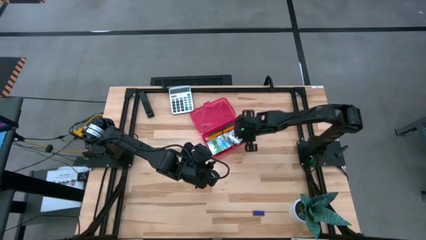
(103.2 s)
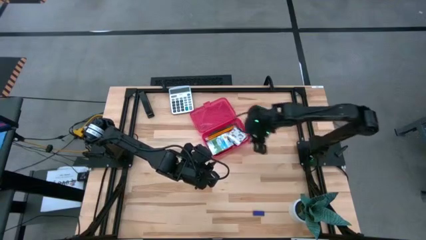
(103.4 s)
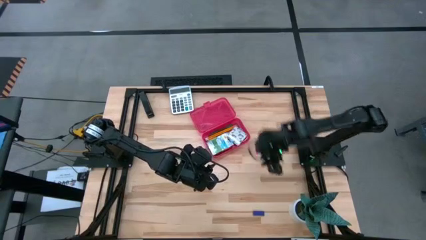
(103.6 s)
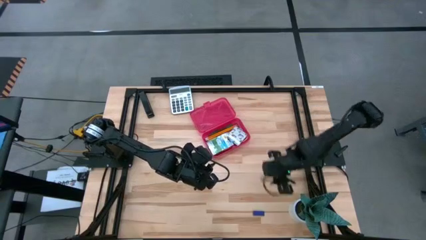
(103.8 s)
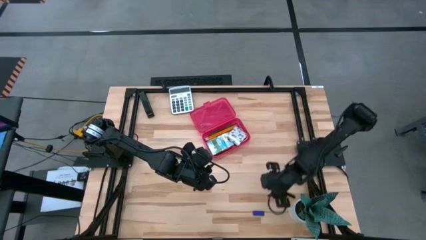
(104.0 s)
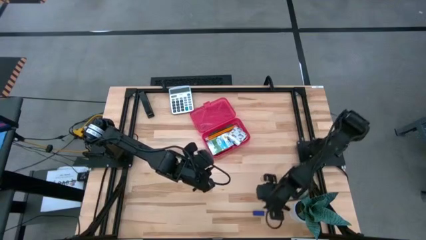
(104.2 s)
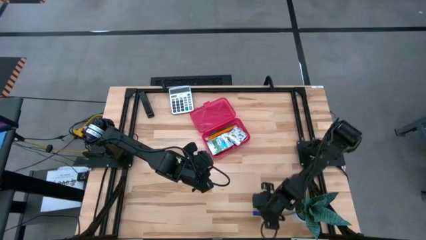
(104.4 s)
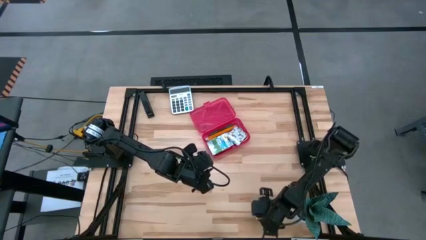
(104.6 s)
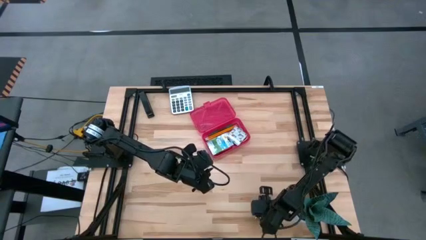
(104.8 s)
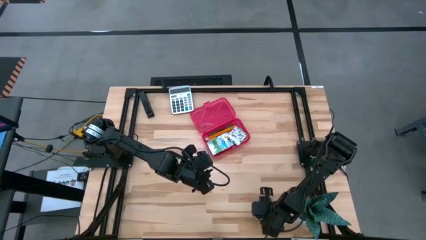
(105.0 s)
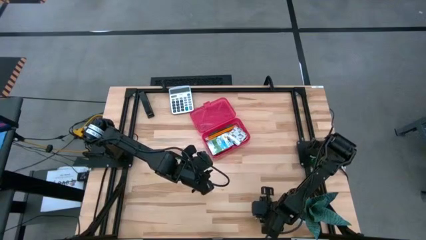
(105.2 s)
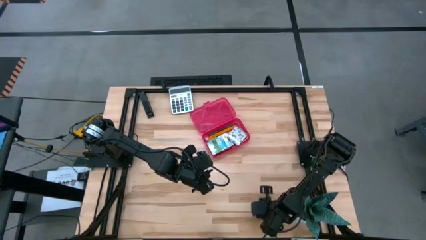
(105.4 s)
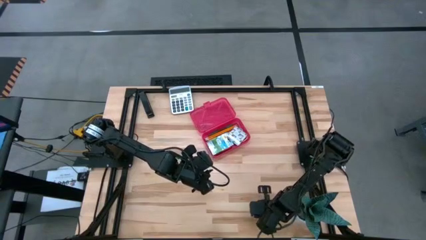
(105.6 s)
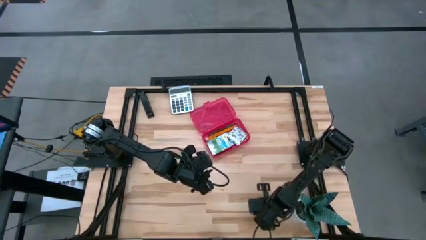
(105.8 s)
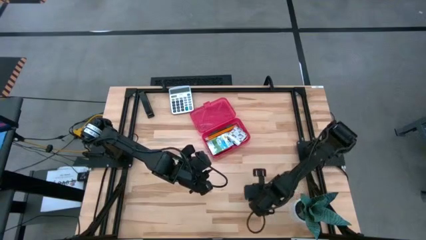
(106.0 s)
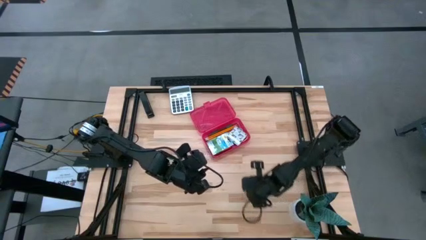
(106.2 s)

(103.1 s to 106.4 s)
Task: Pack school essentials
Put the blue eraser into the red supply box

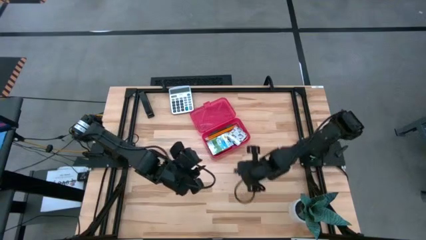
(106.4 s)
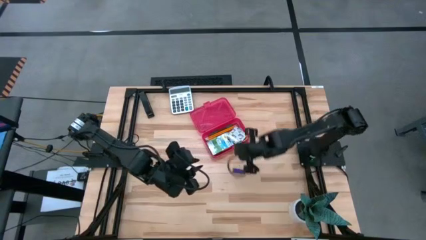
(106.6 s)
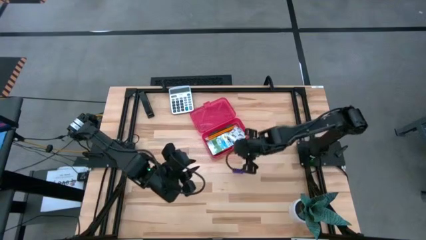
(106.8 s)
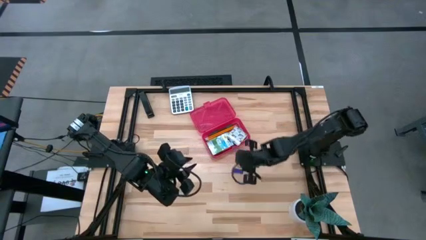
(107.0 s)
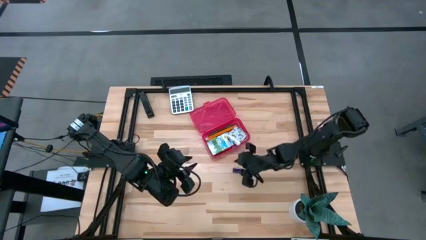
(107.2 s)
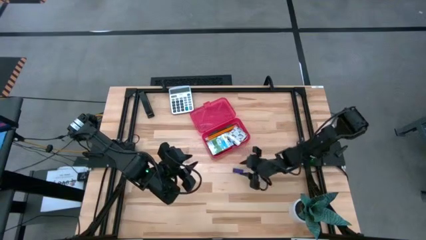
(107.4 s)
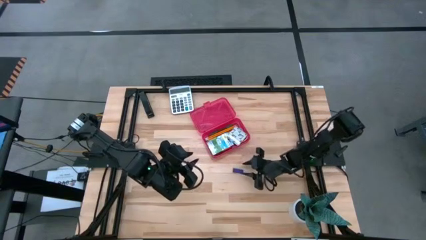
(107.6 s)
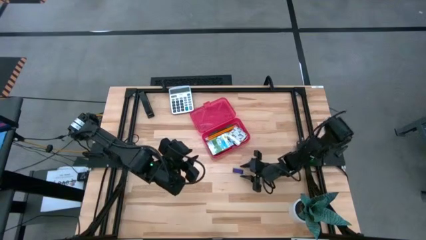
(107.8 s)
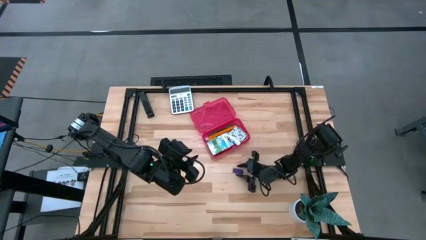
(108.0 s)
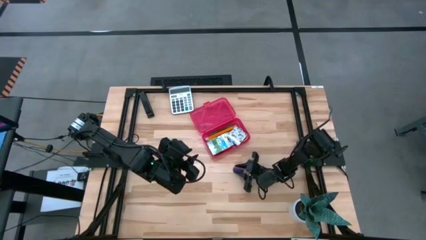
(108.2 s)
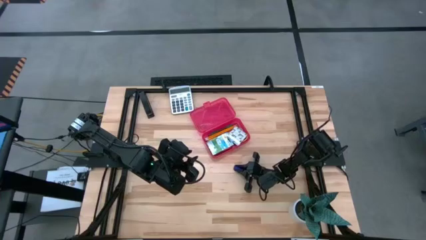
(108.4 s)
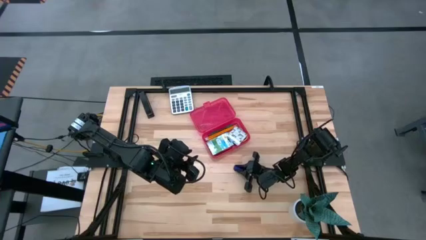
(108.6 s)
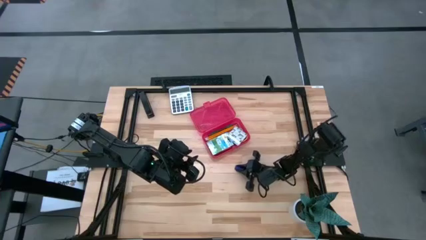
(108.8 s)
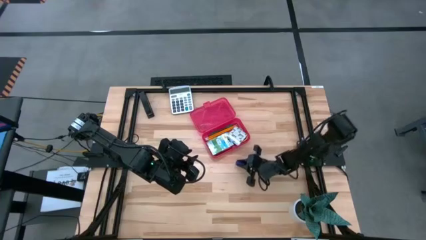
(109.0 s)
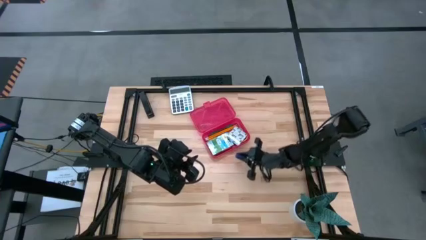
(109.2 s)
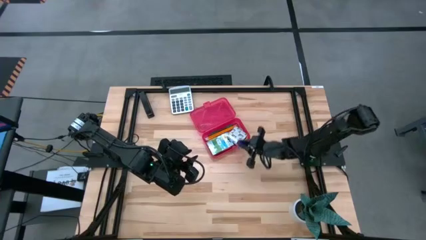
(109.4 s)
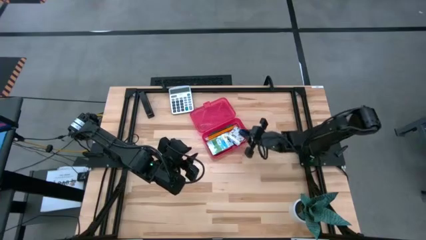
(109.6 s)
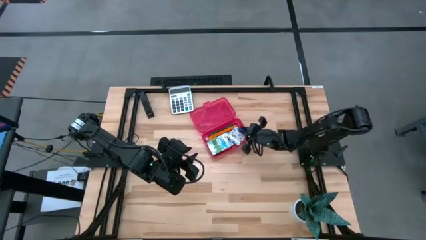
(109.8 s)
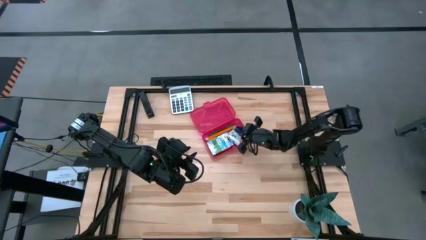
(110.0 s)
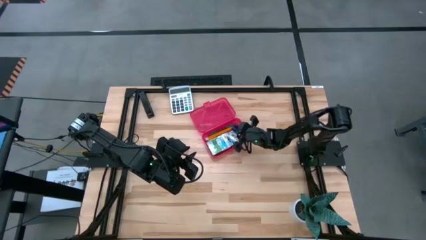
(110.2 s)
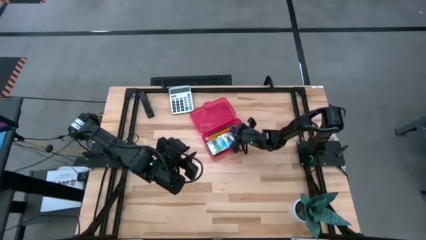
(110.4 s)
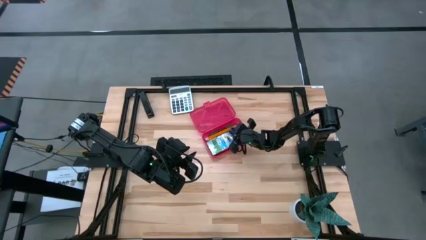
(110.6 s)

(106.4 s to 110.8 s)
Put the blue eraser into the red supply box

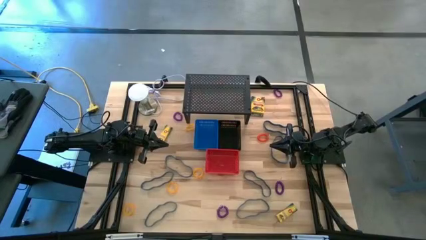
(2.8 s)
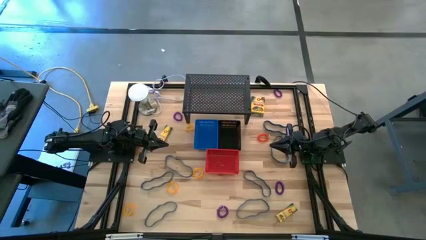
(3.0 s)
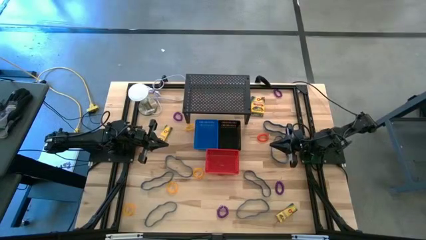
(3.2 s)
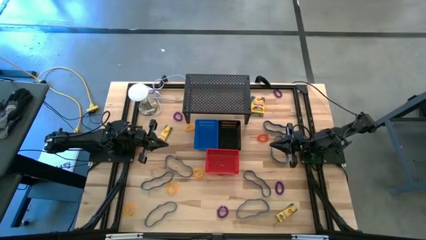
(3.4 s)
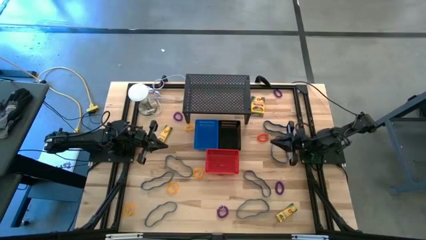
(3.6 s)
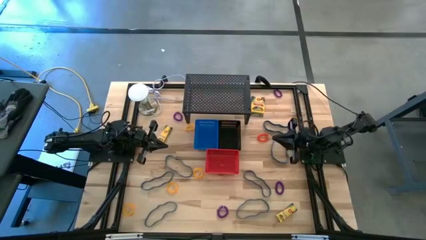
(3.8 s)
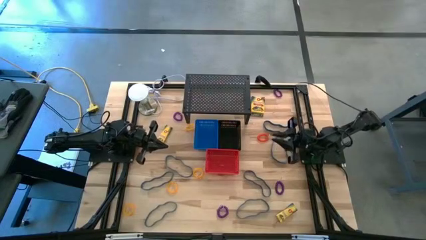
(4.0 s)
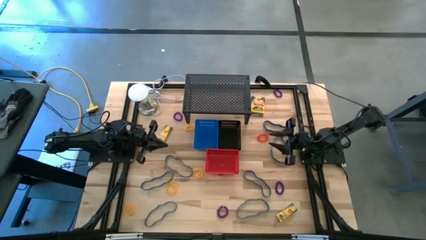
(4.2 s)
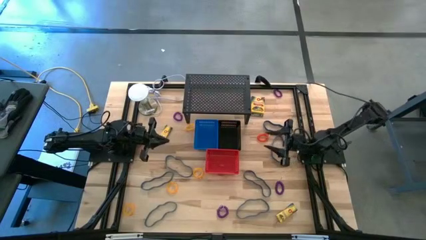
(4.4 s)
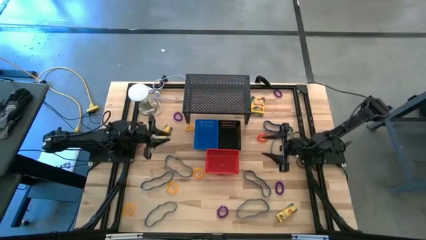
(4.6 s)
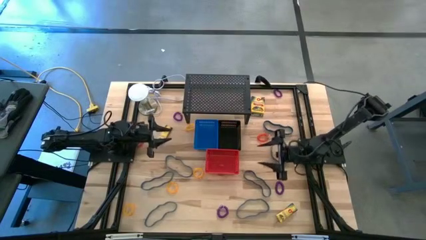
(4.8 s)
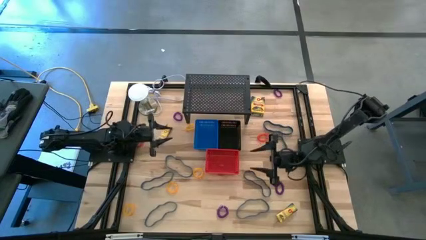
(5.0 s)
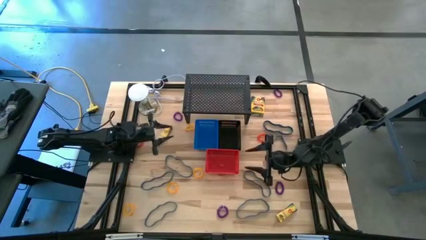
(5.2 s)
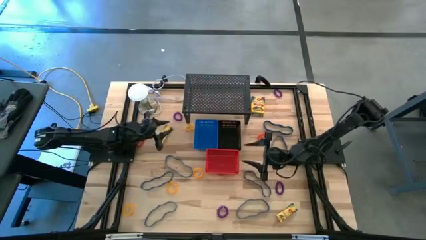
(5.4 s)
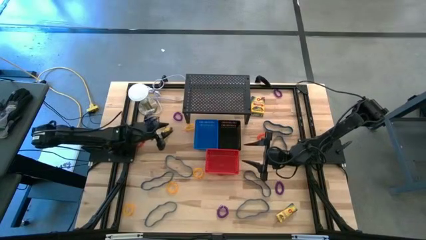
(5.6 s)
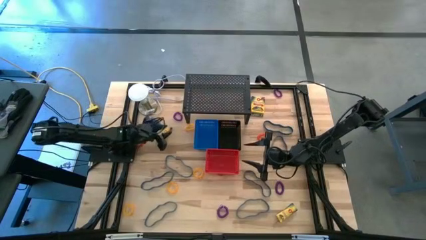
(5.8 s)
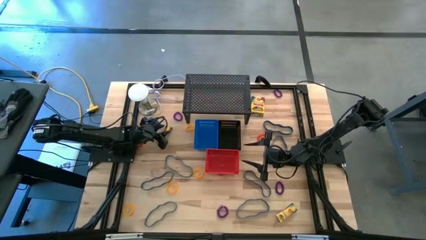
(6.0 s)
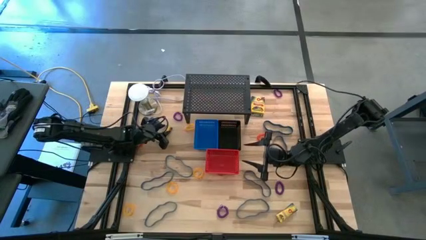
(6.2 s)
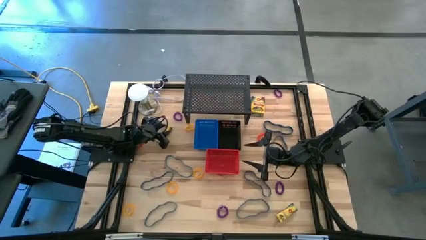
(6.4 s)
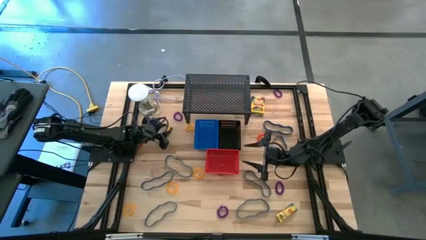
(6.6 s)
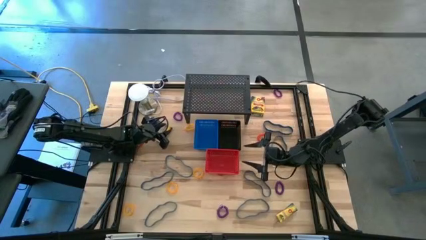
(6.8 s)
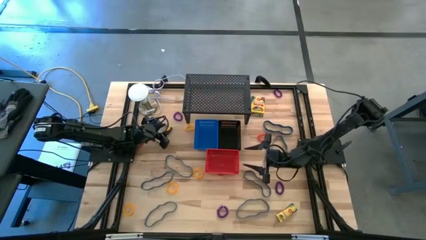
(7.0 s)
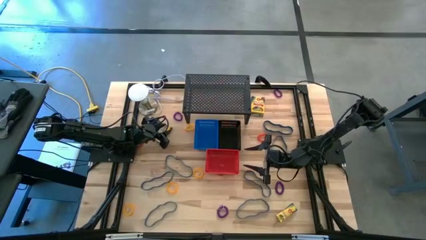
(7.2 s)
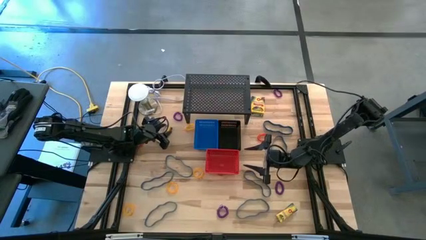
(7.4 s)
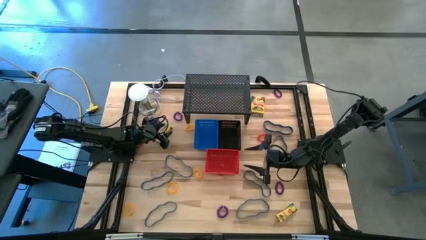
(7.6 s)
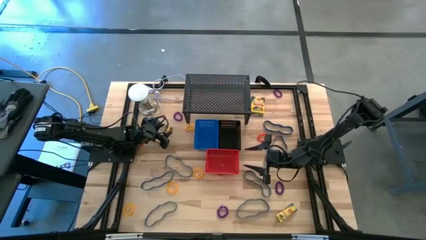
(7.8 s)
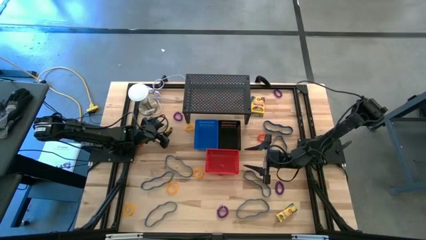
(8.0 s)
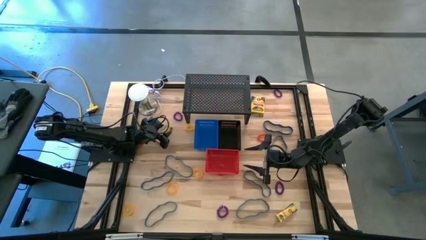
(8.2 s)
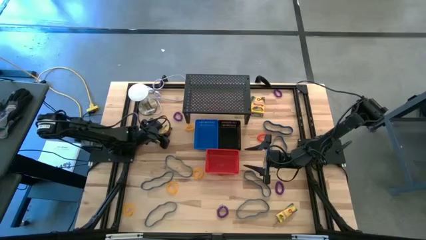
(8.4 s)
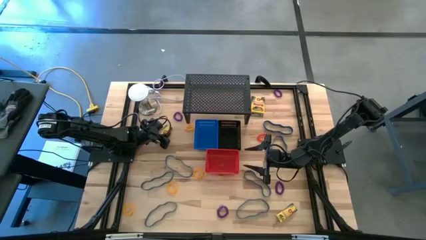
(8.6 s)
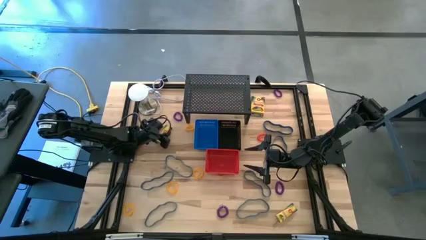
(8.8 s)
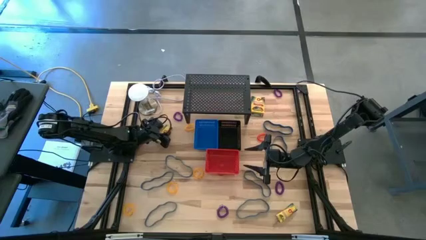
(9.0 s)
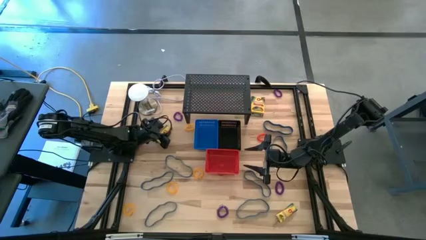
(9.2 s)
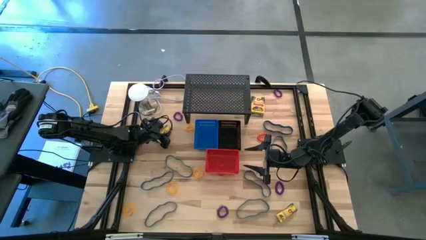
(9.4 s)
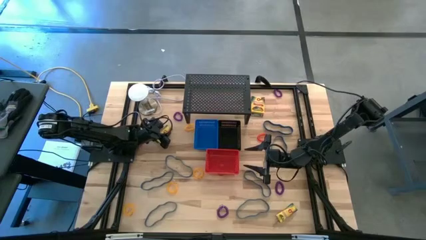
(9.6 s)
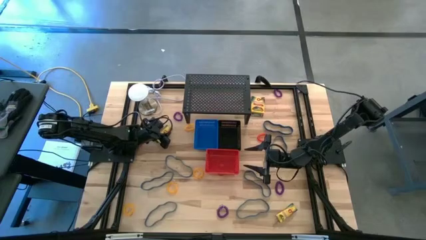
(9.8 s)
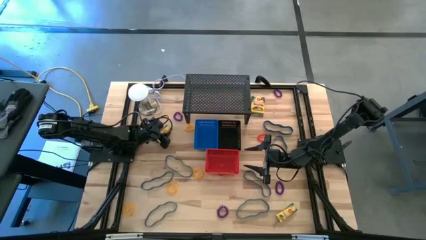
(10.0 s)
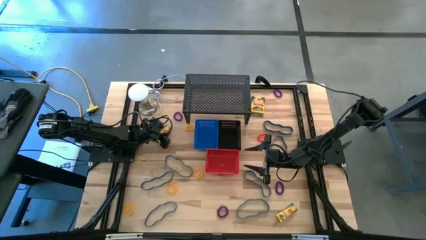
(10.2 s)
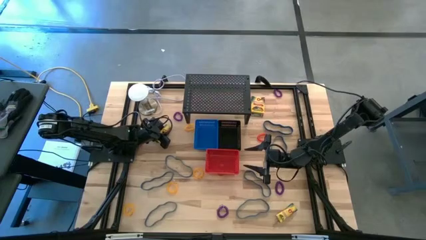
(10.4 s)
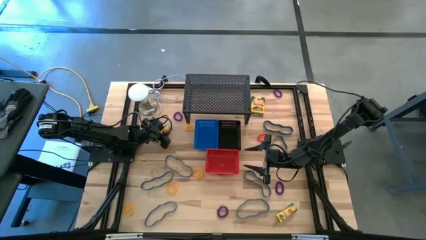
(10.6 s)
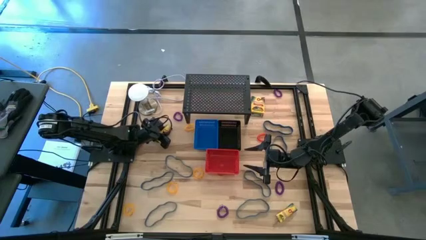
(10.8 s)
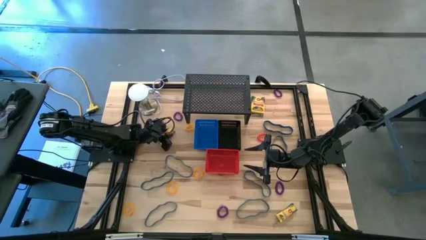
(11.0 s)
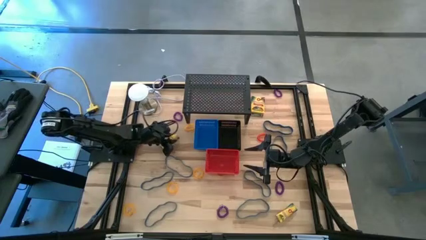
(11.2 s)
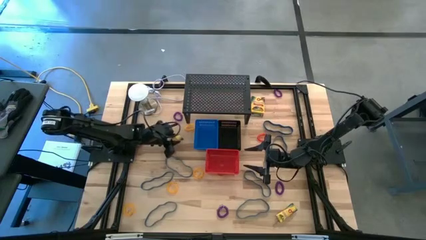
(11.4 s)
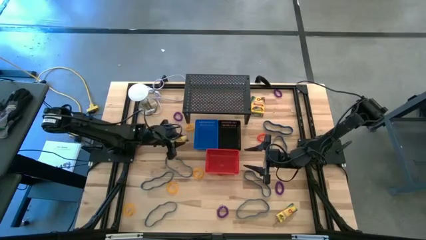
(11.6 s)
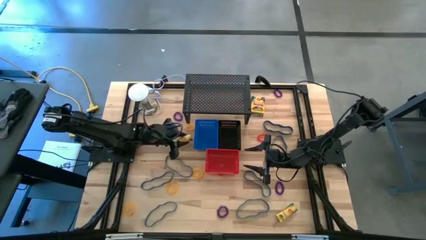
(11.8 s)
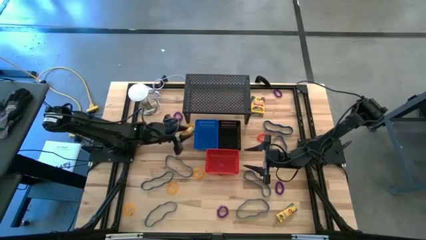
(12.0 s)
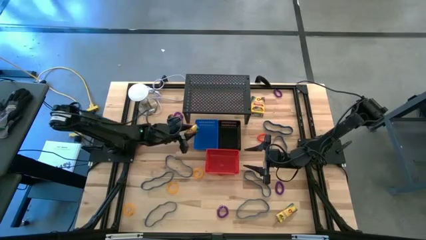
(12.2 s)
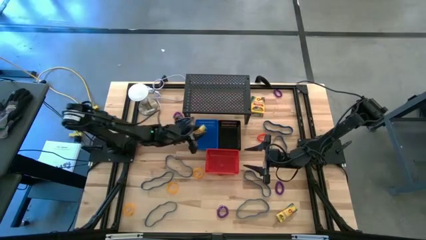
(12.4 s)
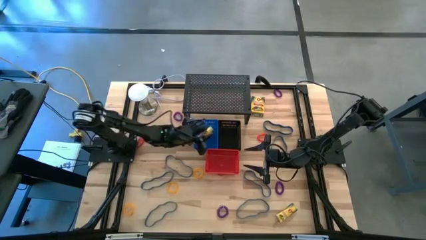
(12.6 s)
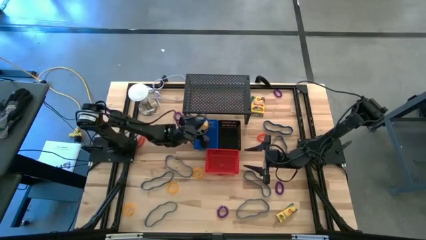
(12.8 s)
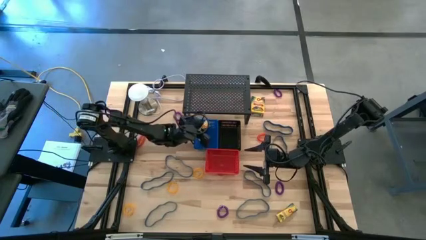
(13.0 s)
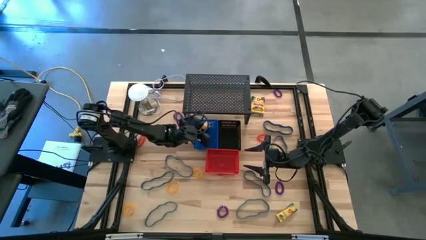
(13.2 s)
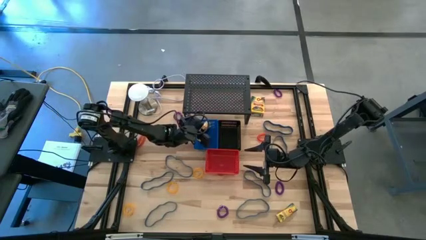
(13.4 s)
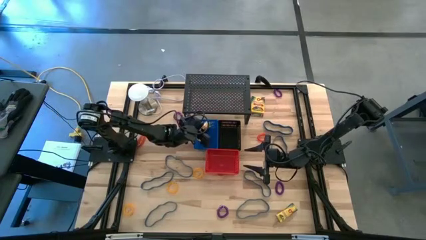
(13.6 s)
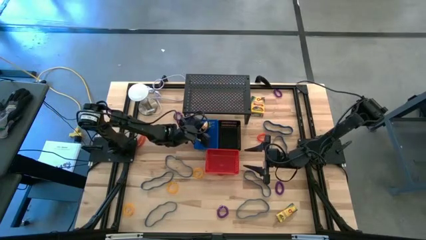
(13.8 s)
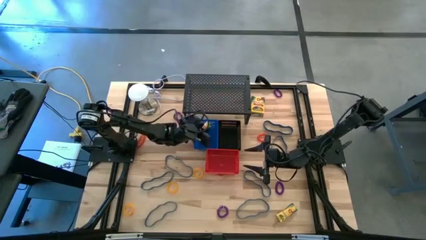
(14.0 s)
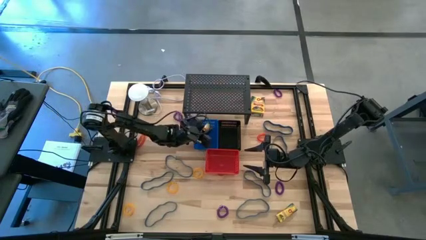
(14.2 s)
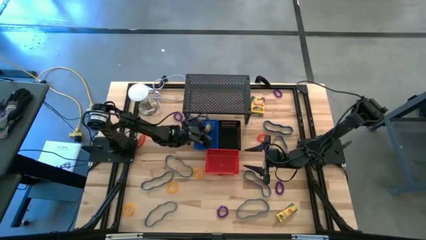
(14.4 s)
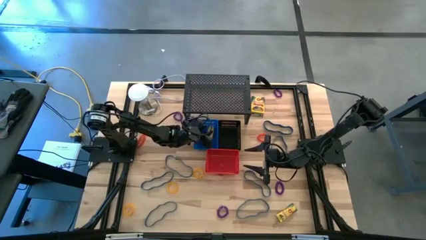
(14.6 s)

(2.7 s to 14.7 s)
Task: Pick & Place Office Desk Supplies
Put the yellow crayon box into the blue bin
